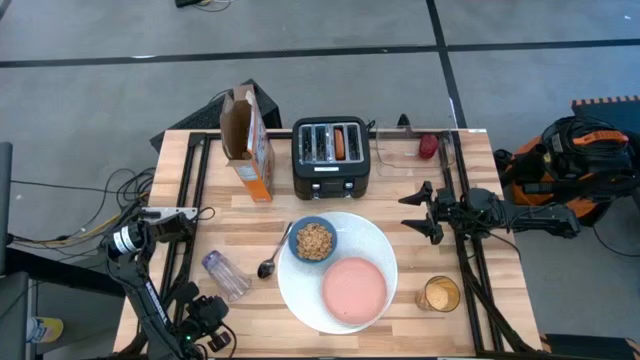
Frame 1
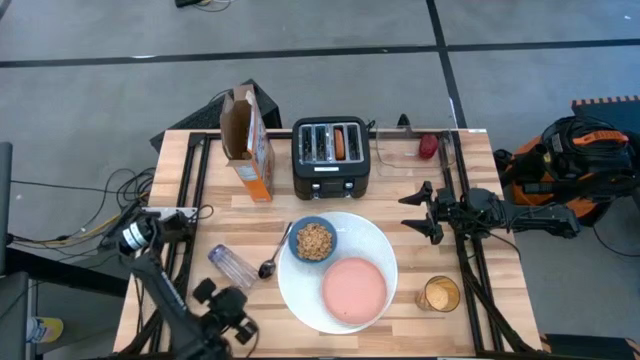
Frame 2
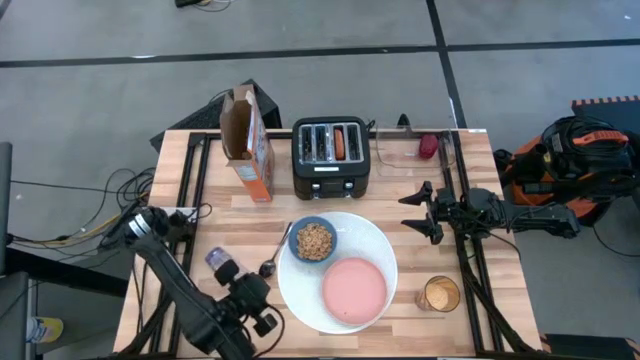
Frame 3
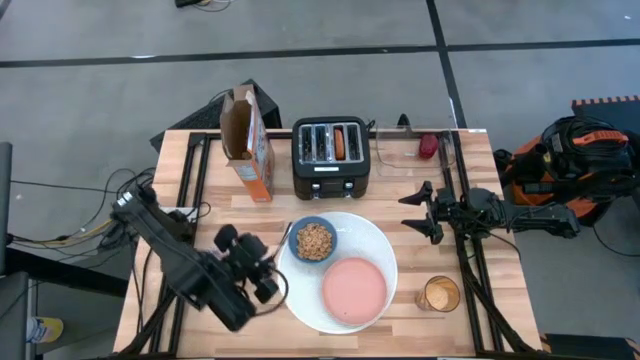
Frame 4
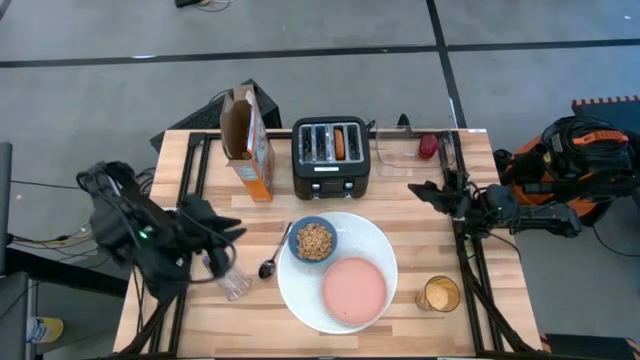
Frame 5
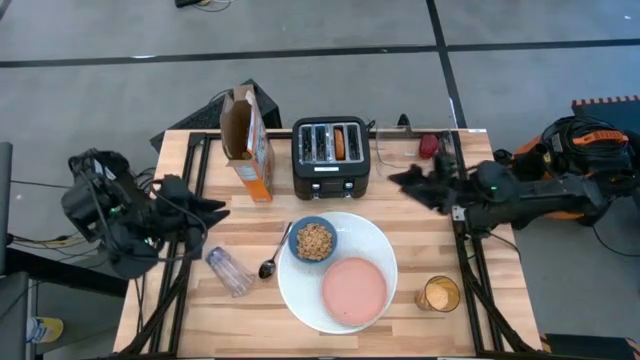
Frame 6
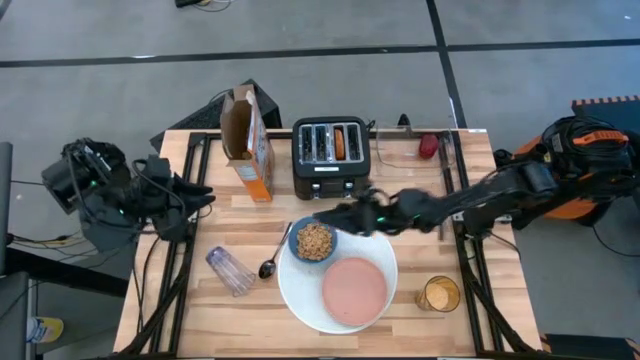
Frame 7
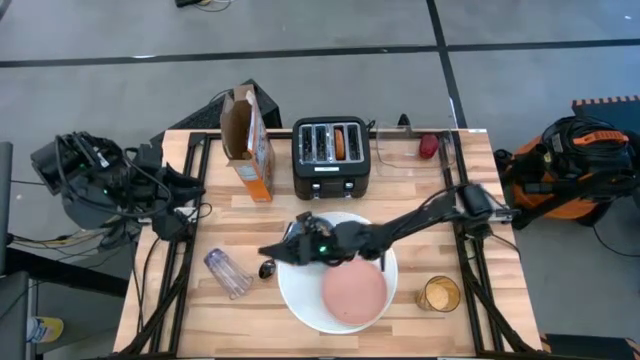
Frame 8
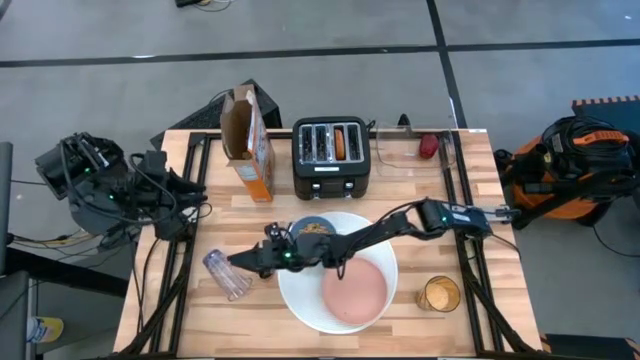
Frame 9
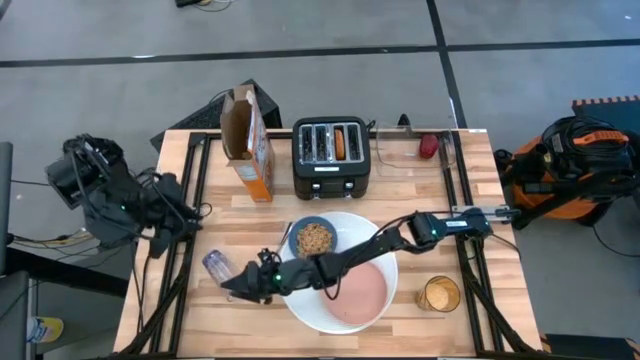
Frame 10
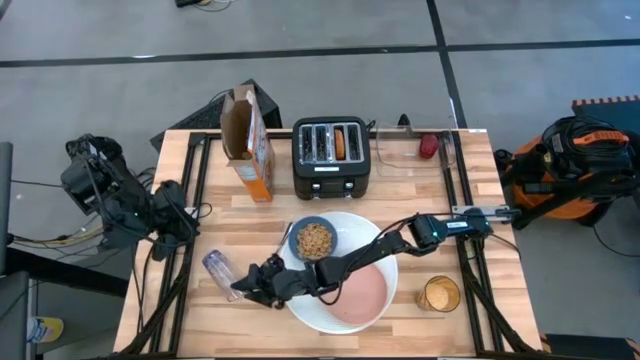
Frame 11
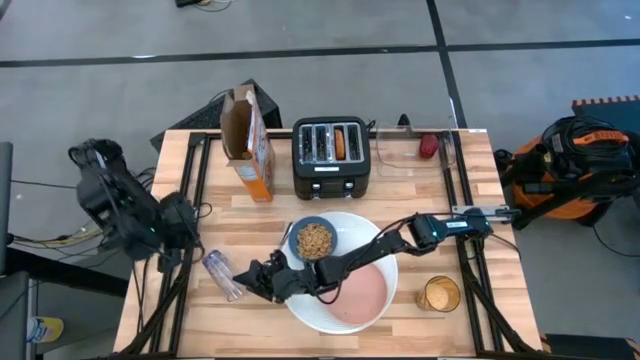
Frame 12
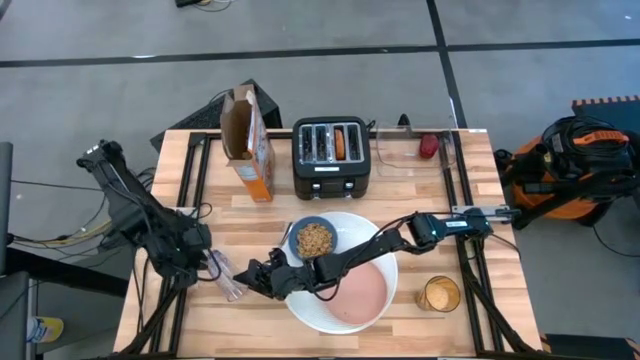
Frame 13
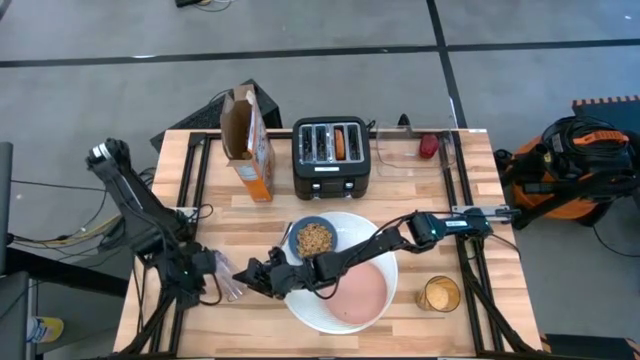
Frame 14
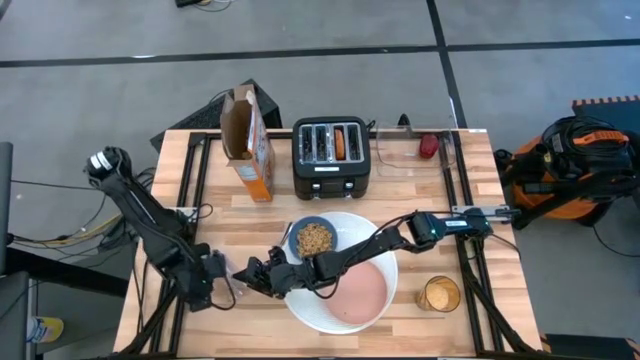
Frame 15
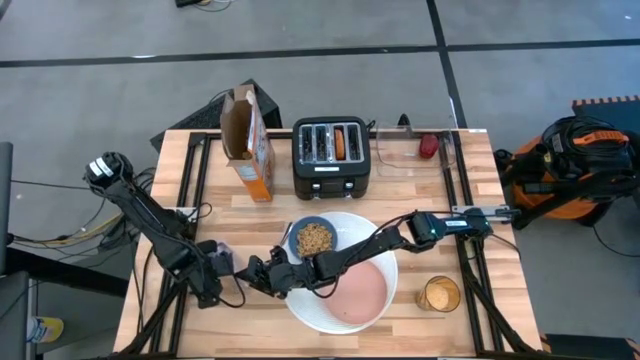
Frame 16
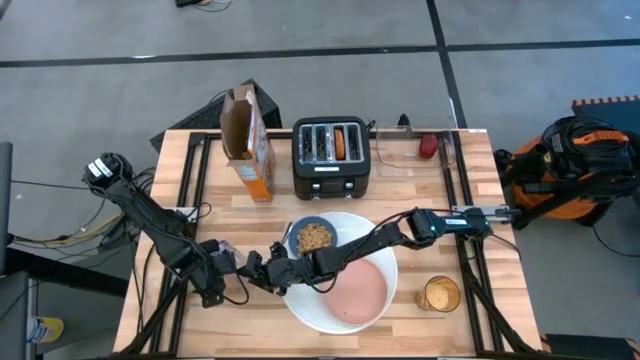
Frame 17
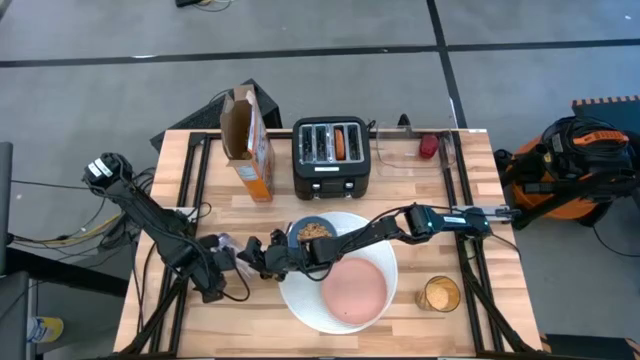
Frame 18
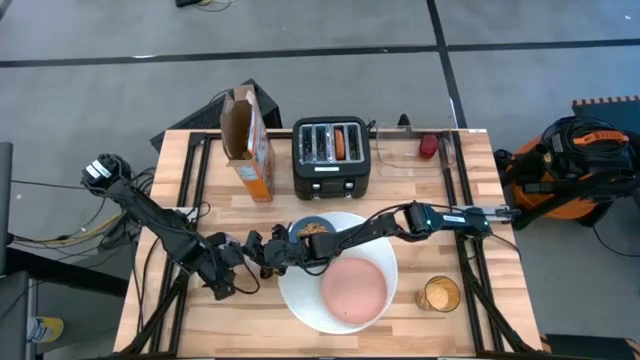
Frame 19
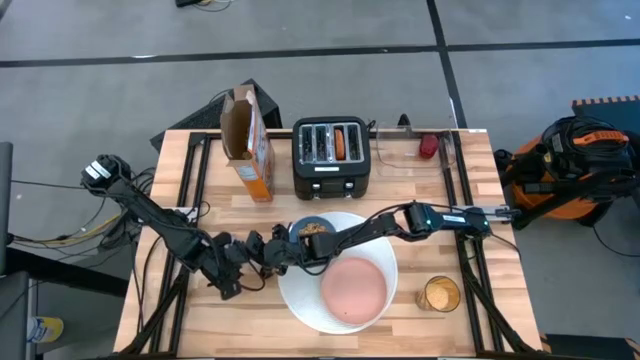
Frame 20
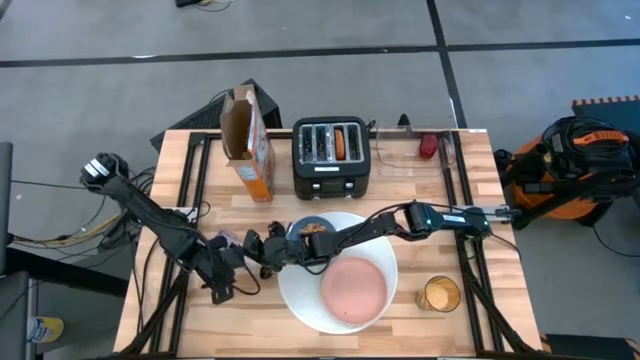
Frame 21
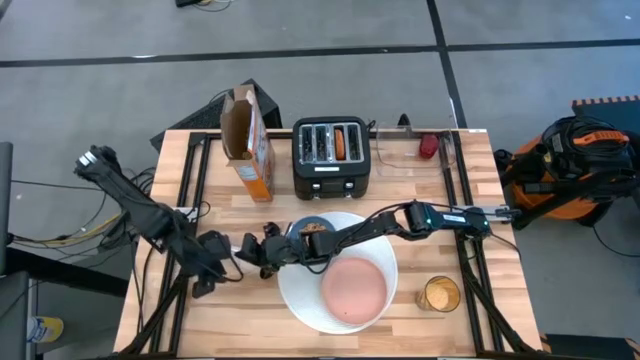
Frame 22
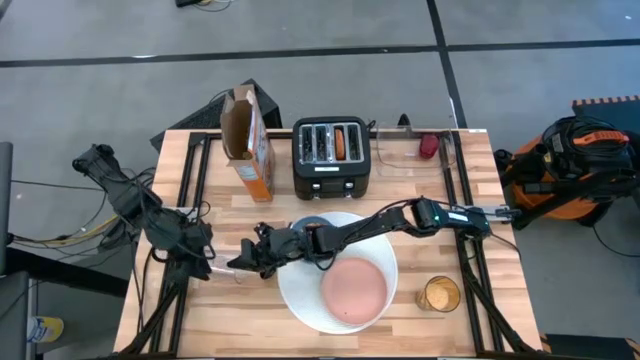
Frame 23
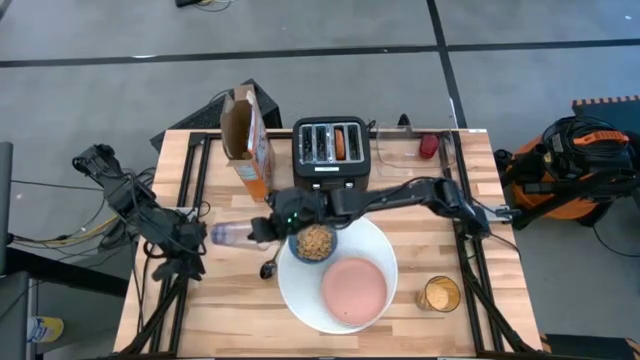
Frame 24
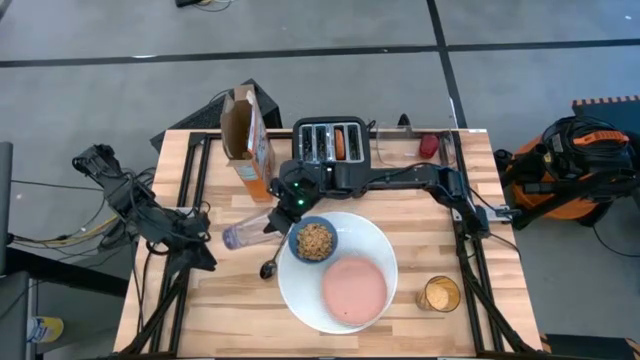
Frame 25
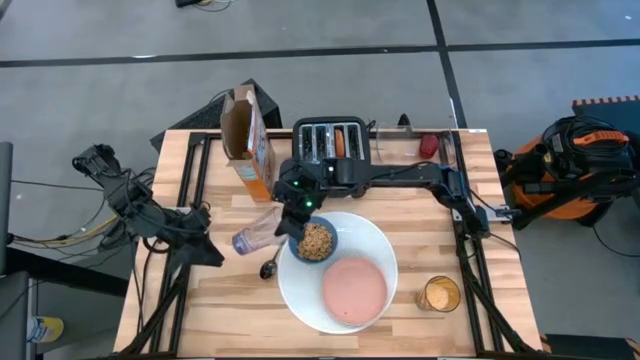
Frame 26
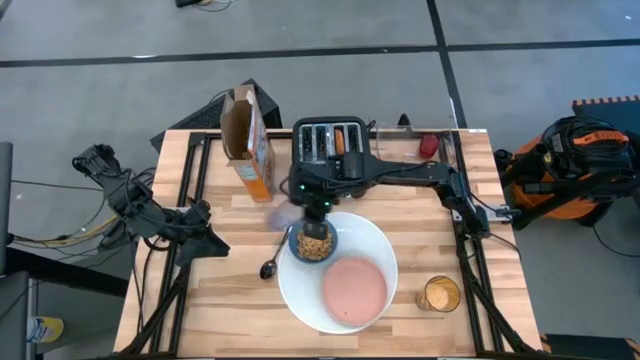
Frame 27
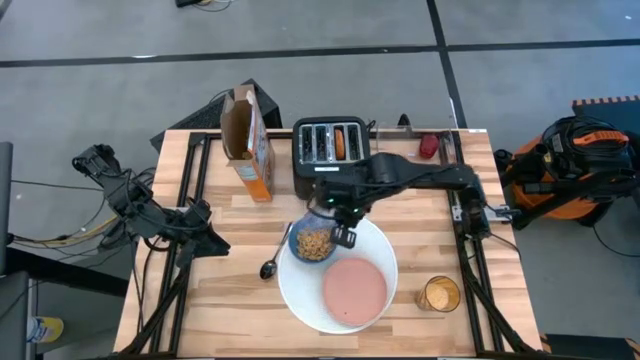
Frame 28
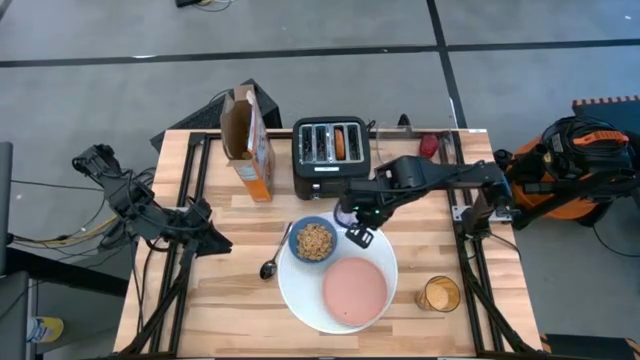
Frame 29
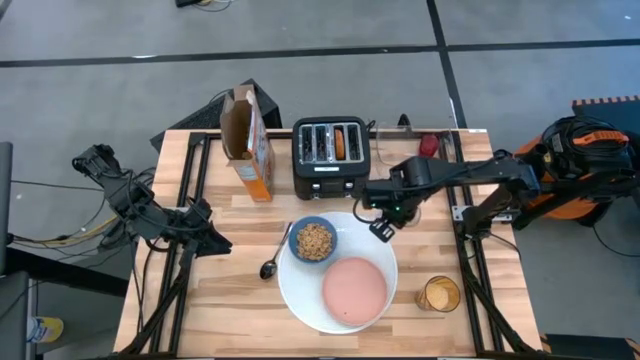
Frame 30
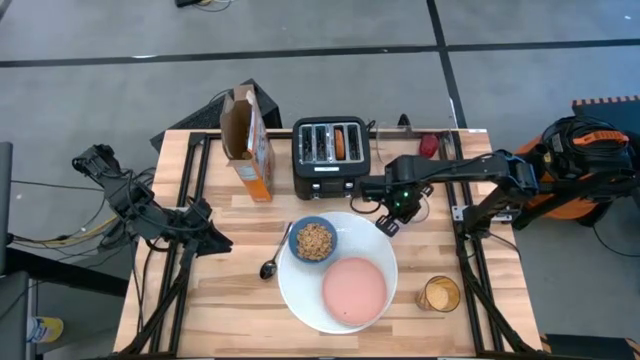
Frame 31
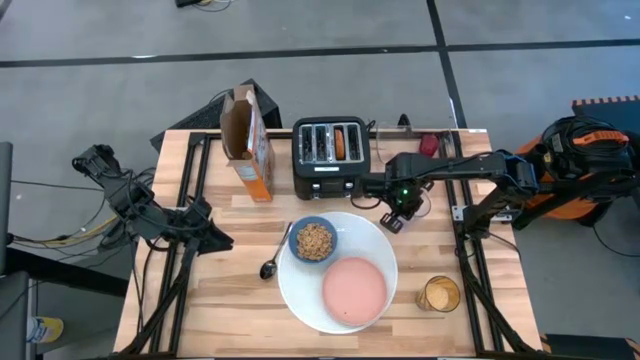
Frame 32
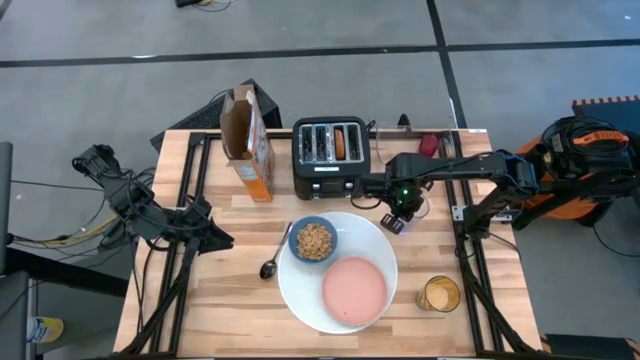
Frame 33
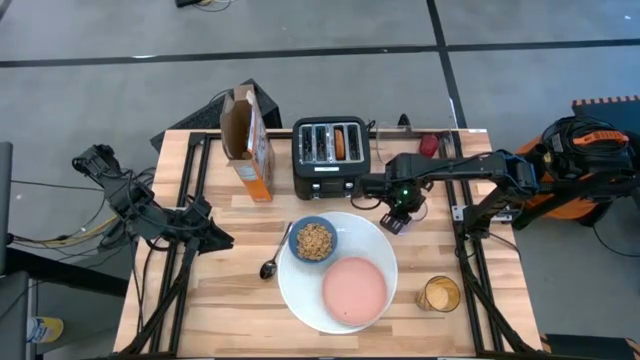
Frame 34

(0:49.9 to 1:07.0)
Task: Arrange a breakfast setting
Put the purple cup on top of the white placemat

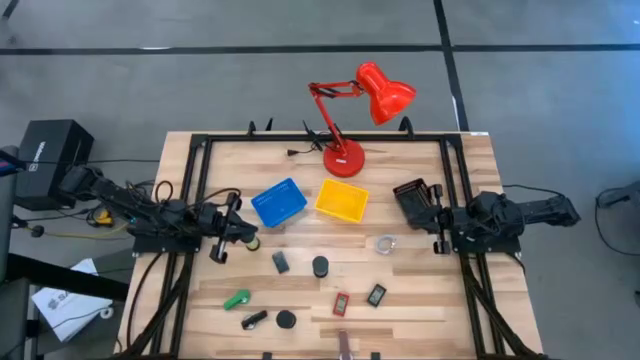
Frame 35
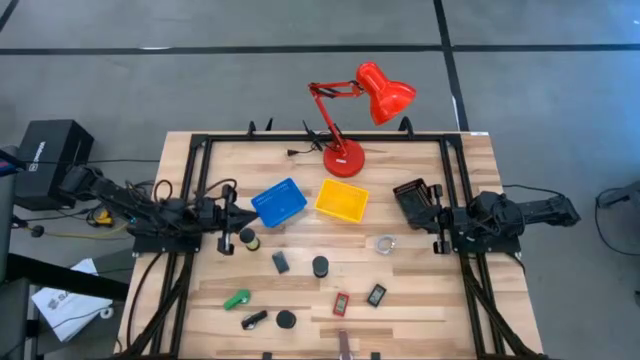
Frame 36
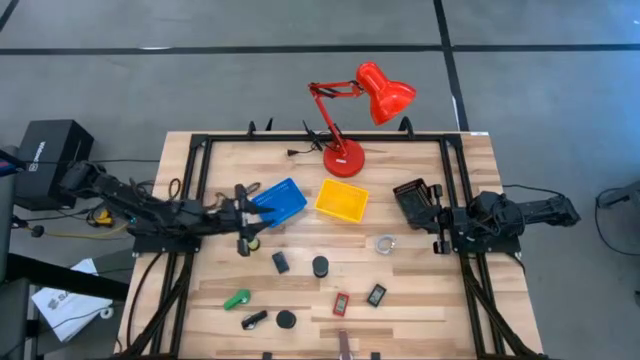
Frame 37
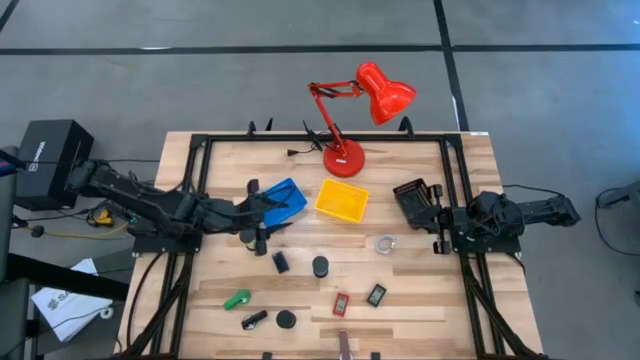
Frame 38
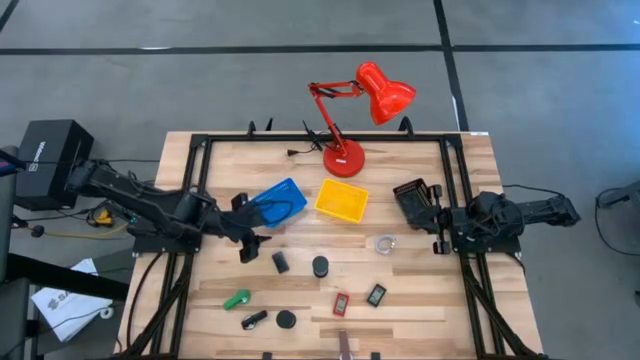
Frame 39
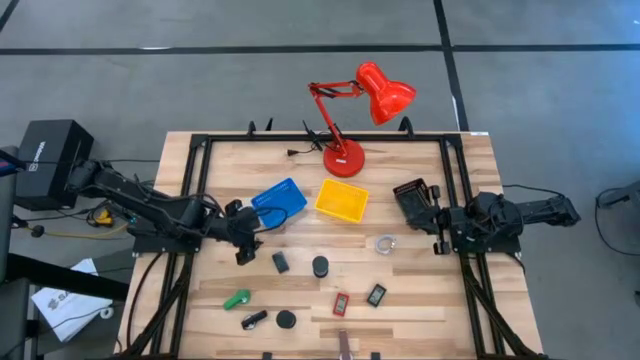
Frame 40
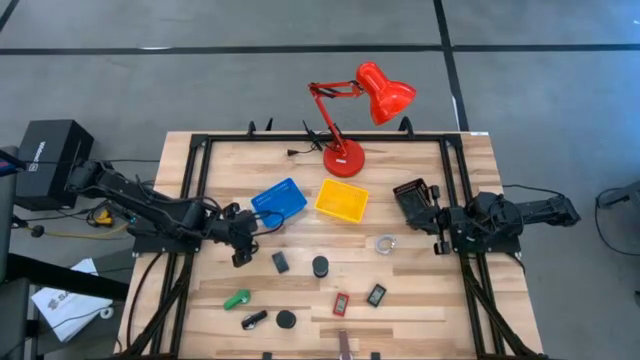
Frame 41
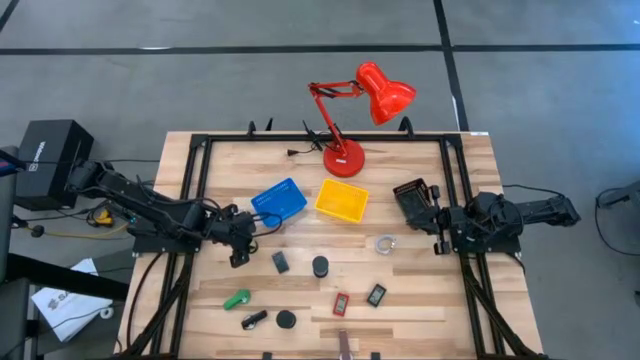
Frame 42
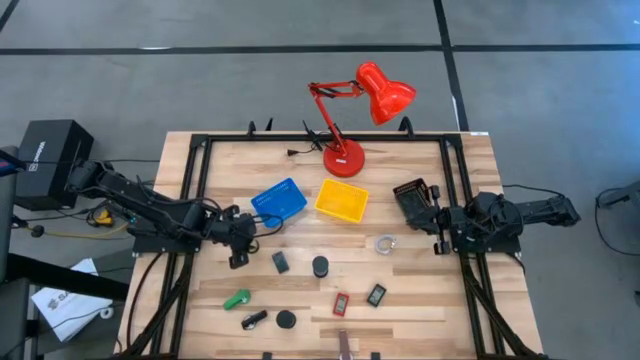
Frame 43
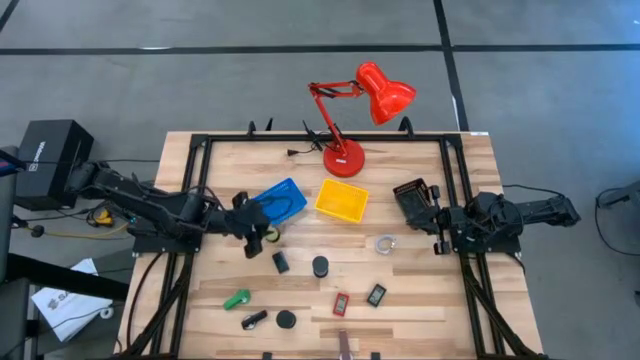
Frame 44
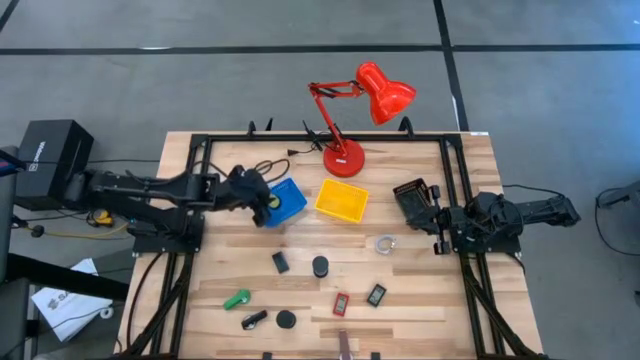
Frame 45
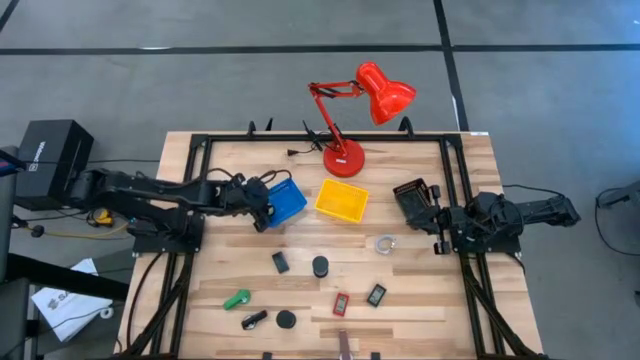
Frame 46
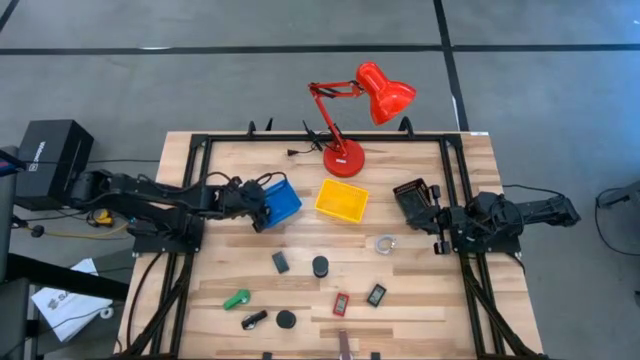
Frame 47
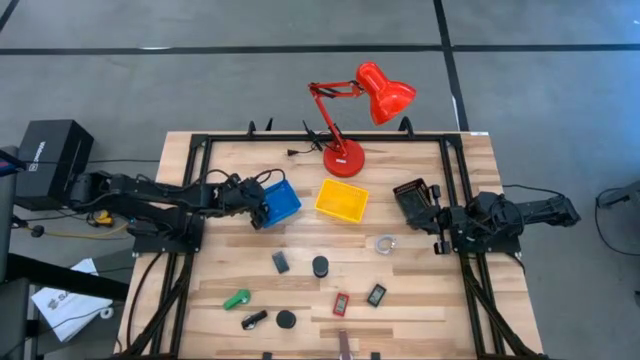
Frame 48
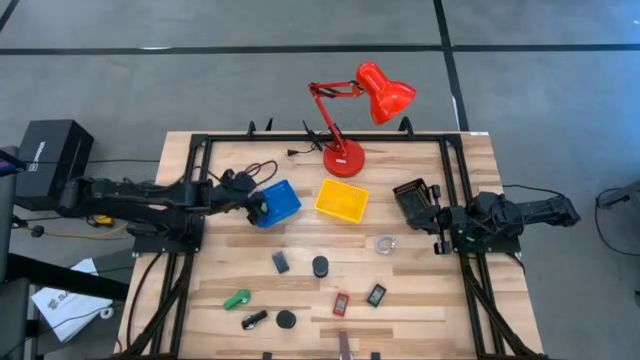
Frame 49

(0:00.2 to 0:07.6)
Task: Pick & Place Office items
Put the green hourglass into the blue bin
